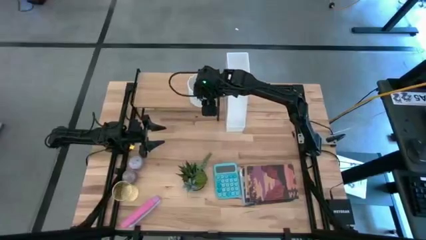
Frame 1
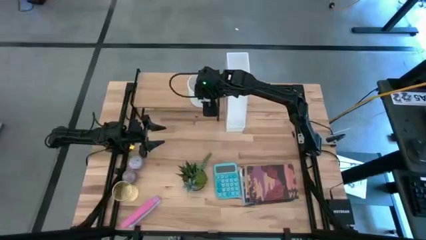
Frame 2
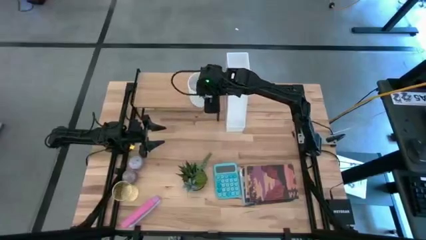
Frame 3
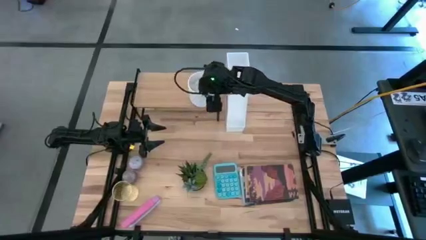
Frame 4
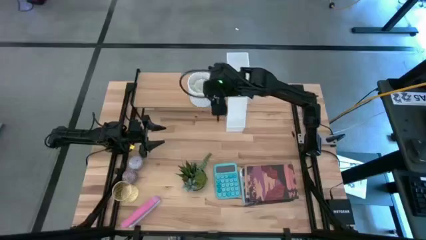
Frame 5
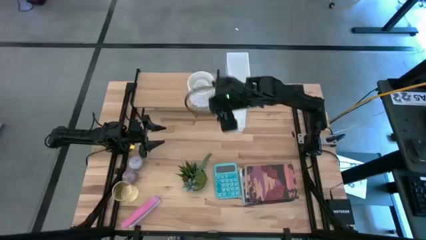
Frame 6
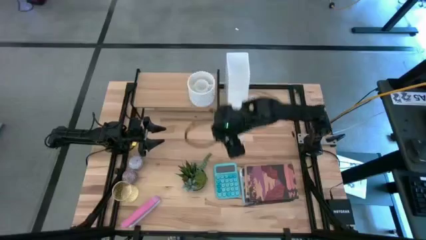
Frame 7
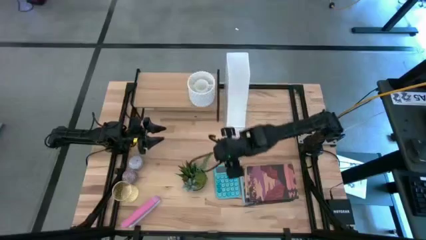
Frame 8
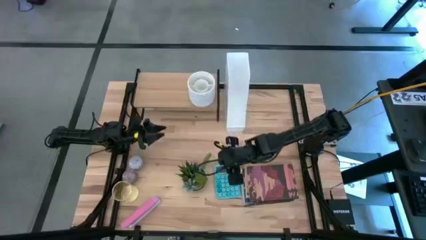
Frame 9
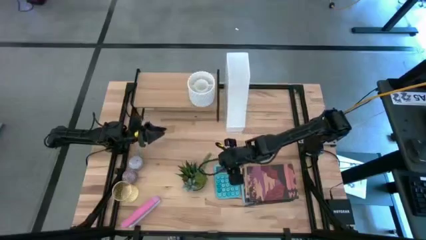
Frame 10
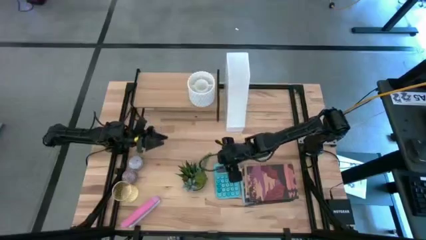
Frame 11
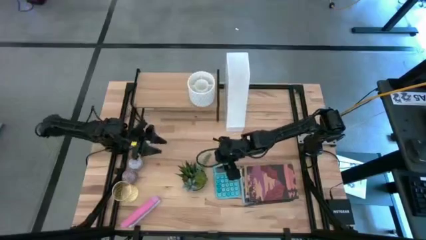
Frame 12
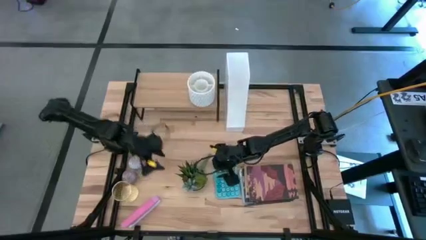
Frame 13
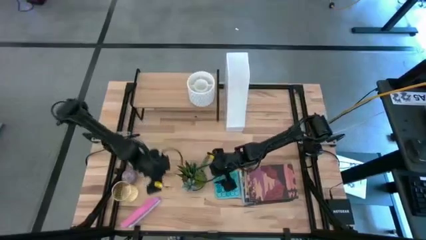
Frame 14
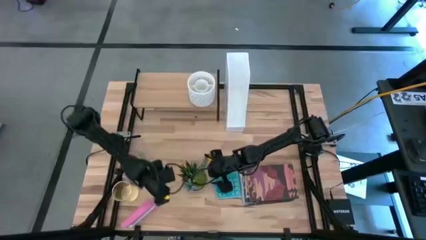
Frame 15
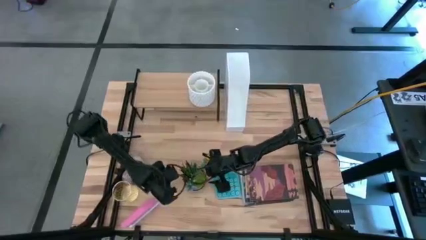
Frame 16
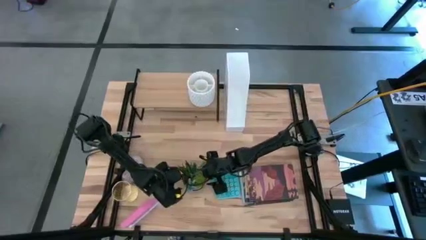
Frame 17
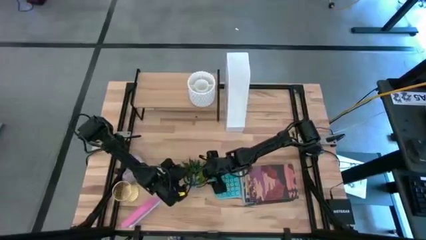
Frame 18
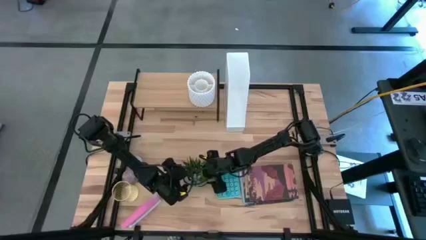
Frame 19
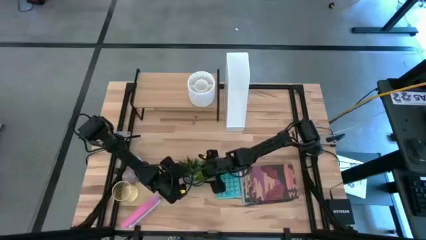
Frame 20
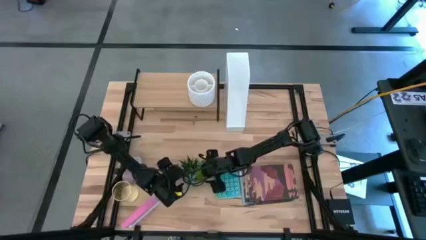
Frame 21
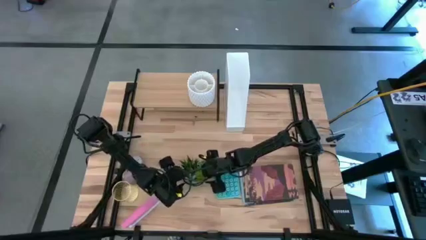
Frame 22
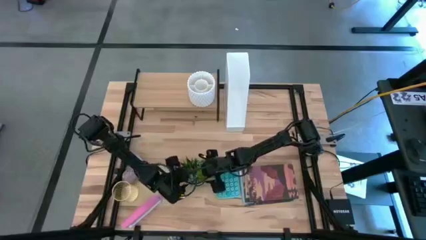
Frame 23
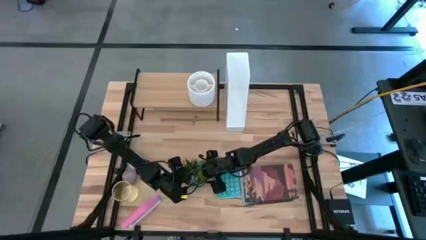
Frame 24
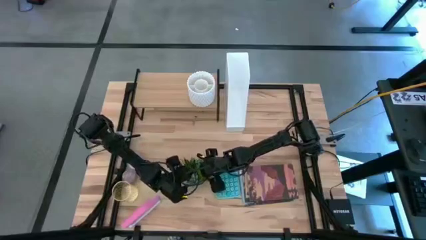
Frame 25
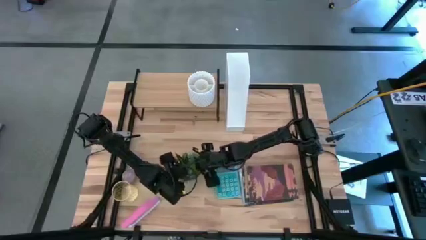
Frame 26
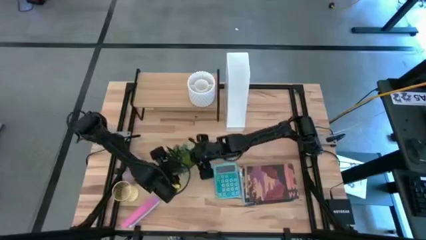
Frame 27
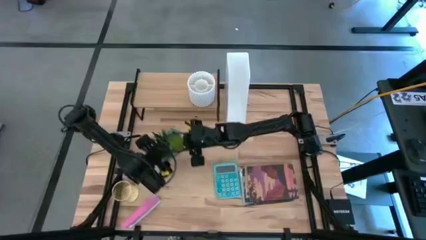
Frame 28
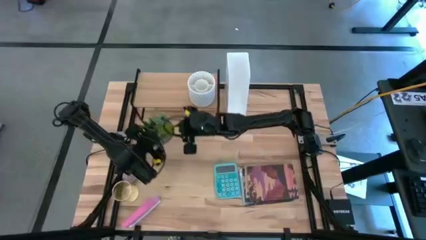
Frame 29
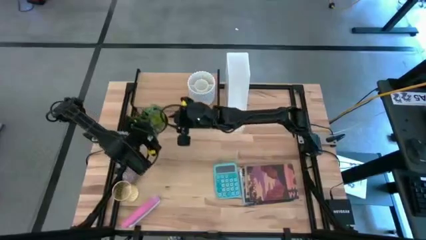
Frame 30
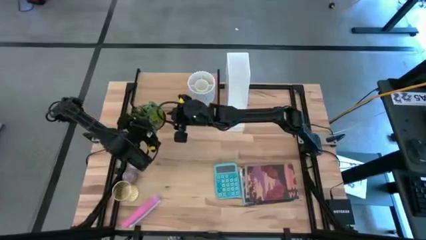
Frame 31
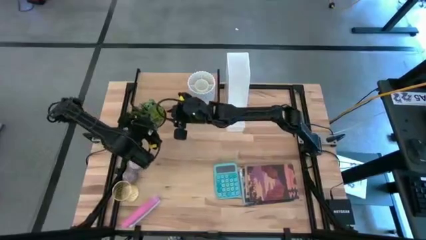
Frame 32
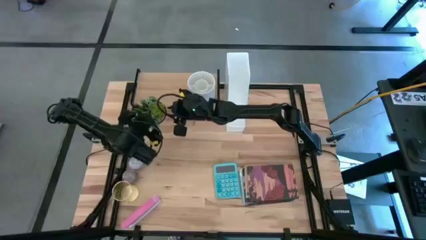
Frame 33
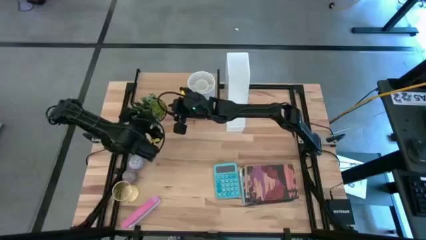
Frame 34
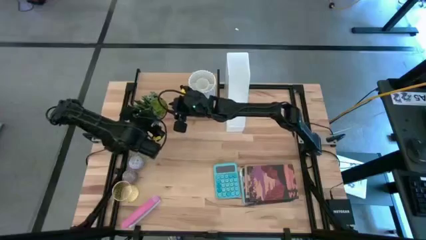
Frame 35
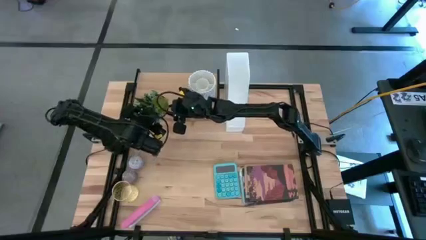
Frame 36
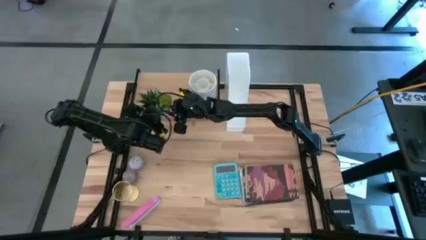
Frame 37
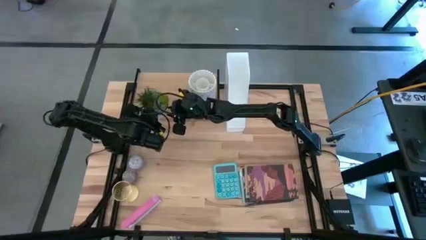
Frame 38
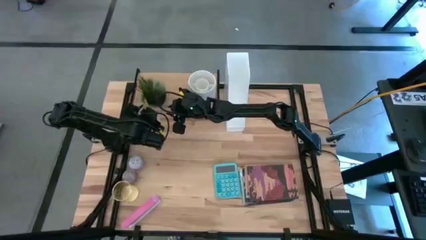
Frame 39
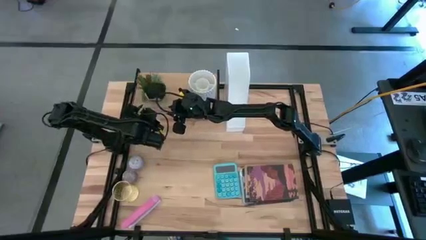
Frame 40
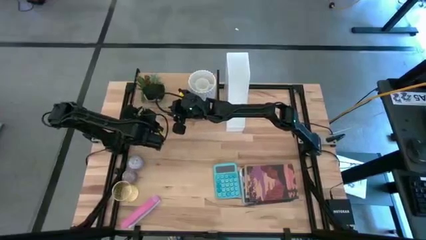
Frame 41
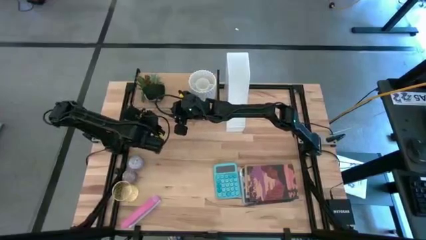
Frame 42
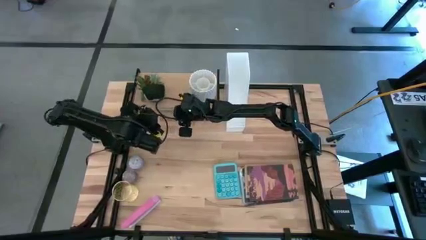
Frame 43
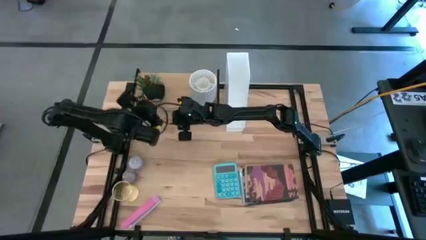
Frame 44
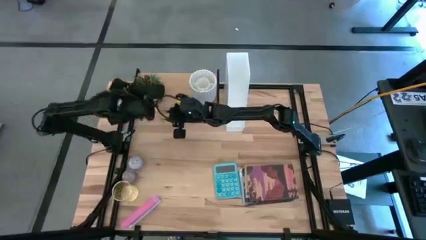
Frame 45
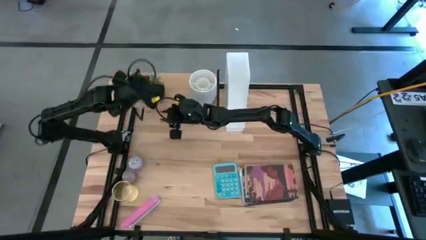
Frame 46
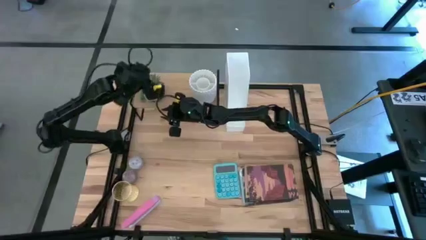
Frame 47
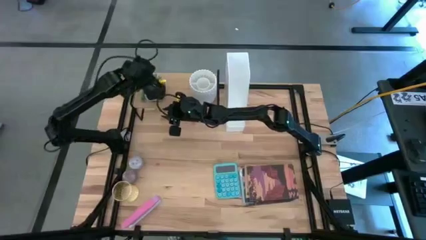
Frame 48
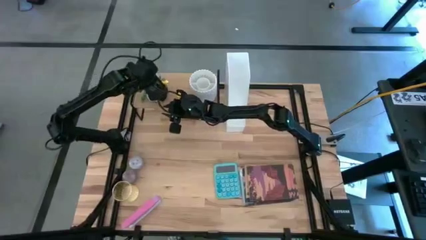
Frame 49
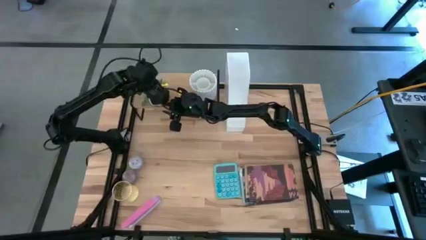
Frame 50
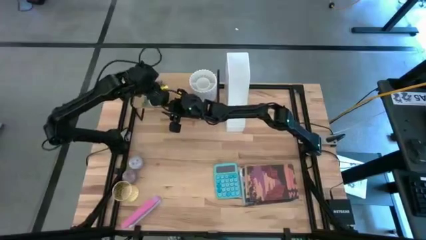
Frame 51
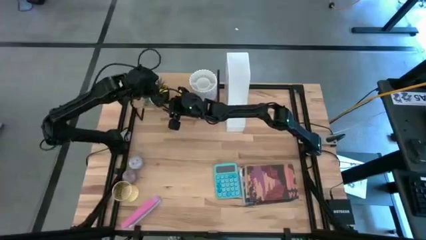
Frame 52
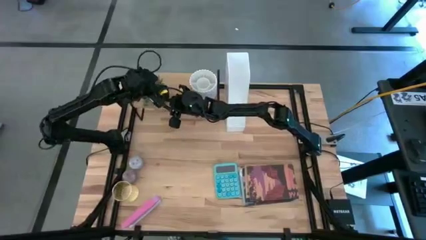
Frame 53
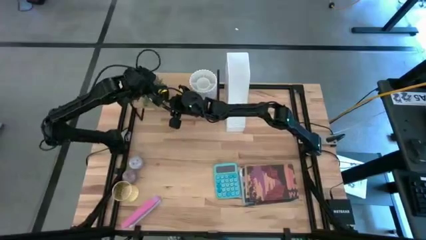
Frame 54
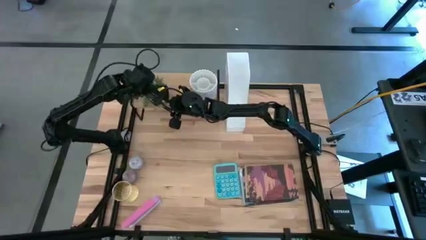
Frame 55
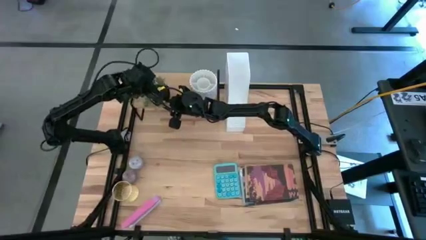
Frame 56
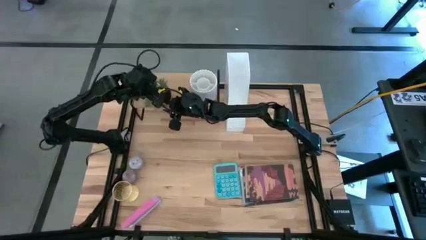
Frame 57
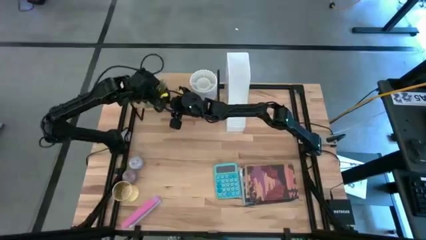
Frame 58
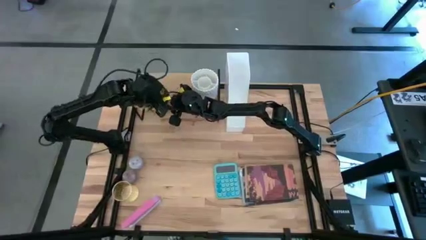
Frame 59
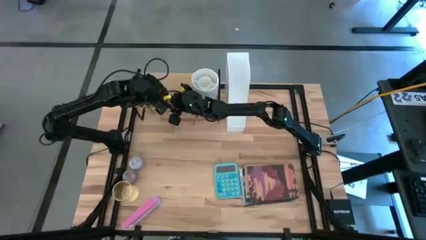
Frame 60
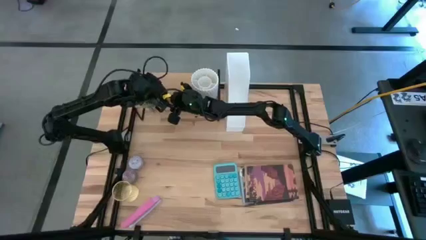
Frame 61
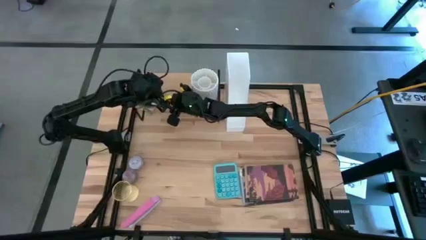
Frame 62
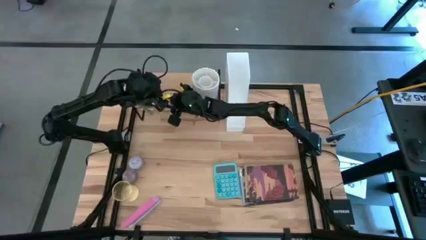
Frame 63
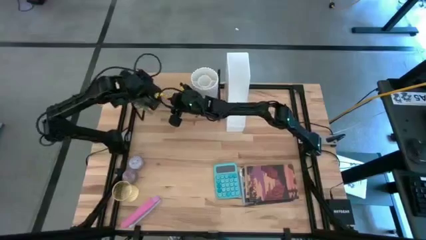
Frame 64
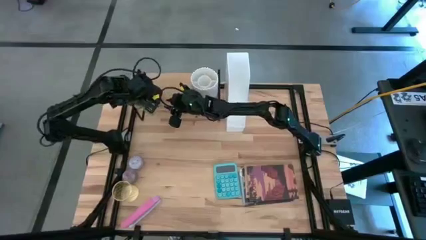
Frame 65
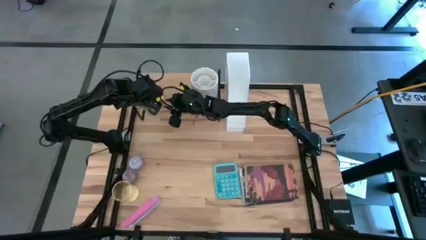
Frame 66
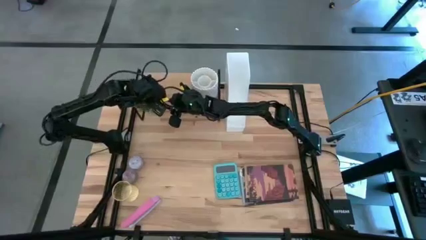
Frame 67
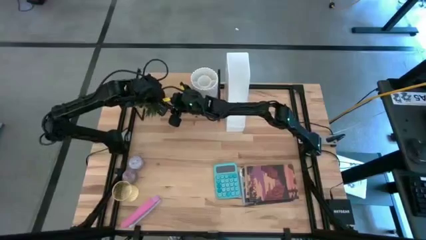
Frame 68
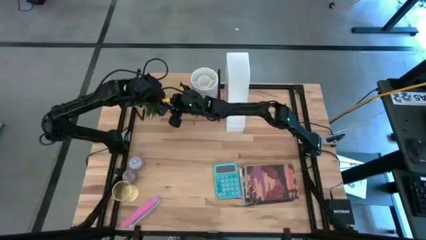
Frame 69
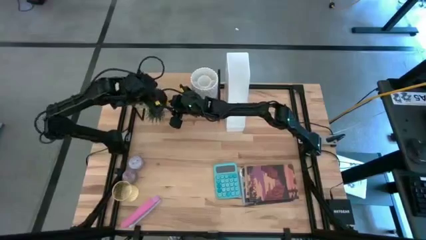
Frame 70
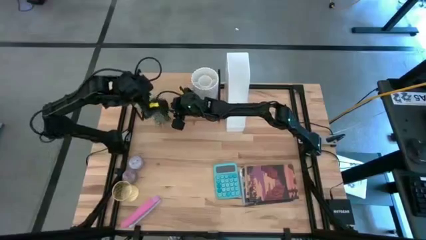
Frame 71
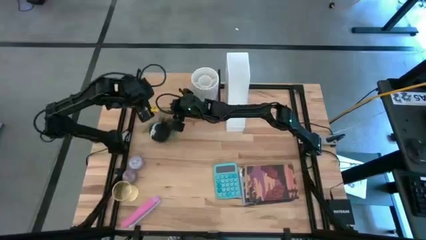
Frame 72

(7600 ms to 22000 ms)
Task: Stock shelves
Put the potted plant on the shelf
